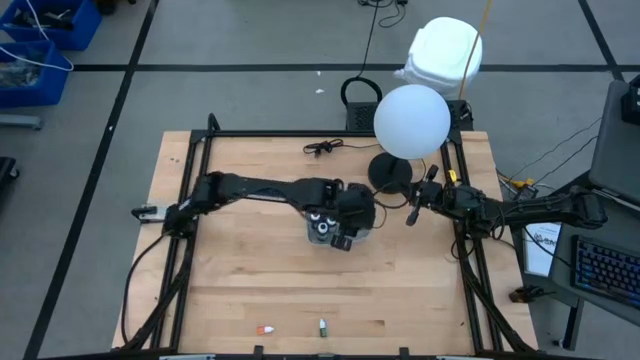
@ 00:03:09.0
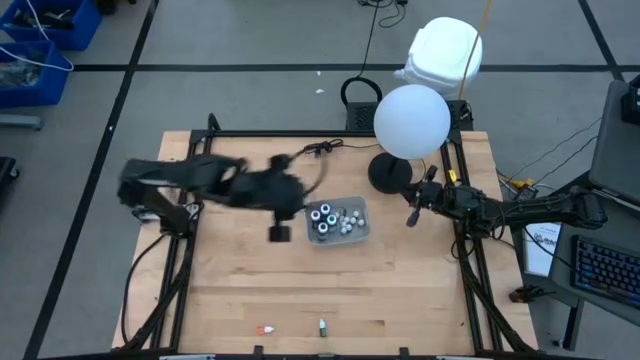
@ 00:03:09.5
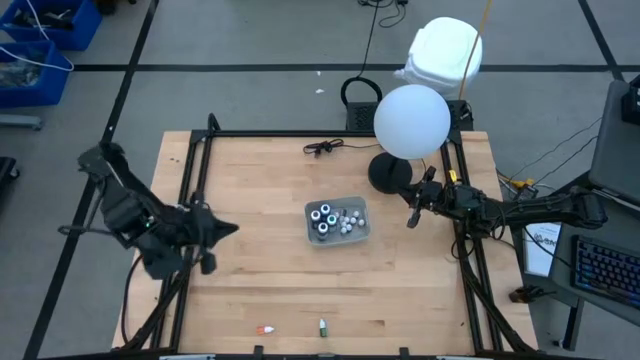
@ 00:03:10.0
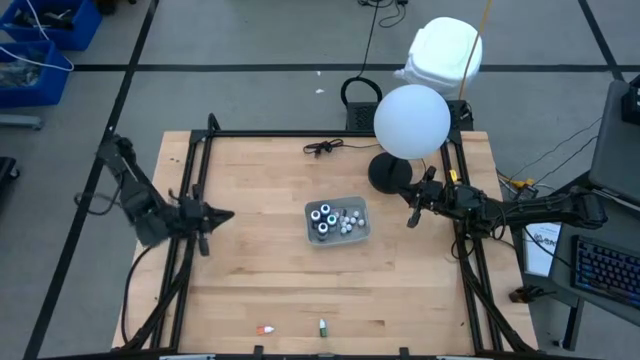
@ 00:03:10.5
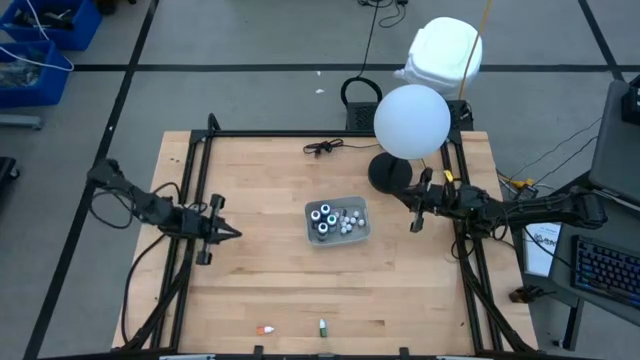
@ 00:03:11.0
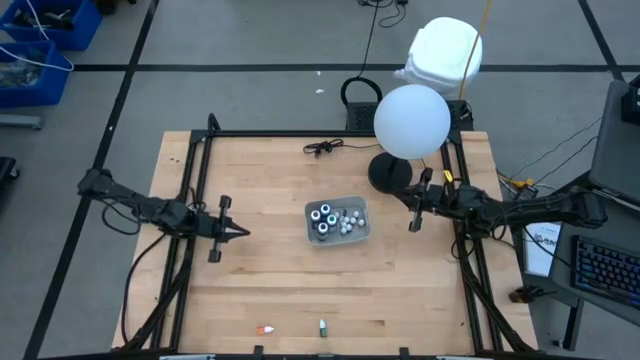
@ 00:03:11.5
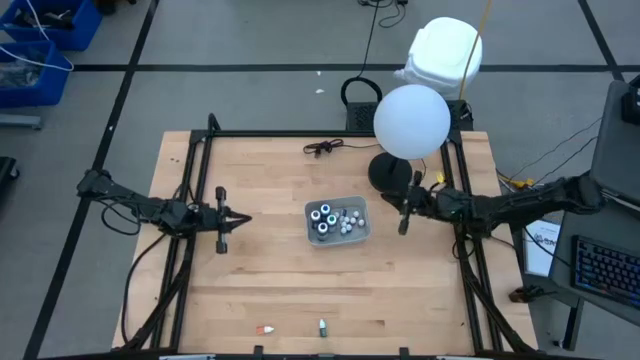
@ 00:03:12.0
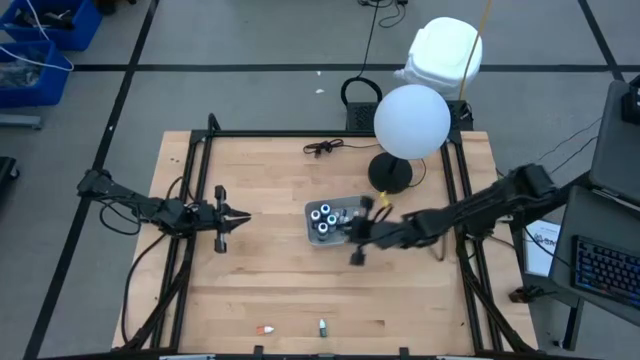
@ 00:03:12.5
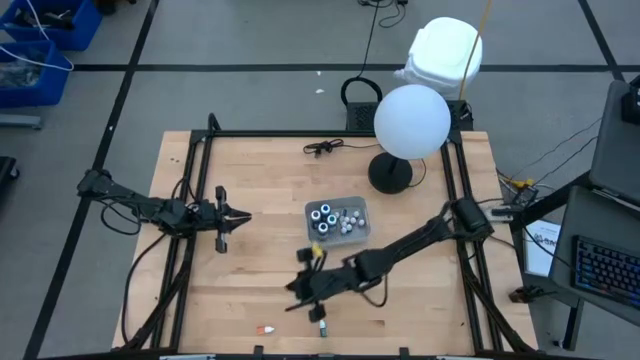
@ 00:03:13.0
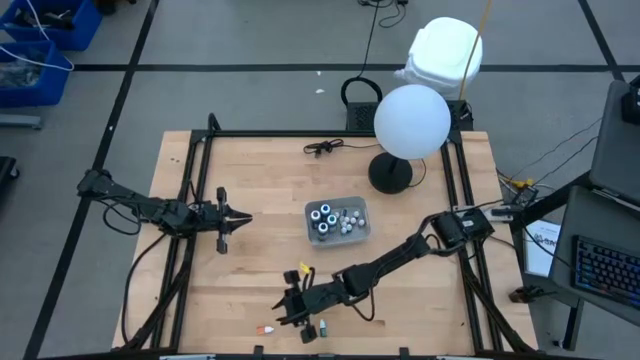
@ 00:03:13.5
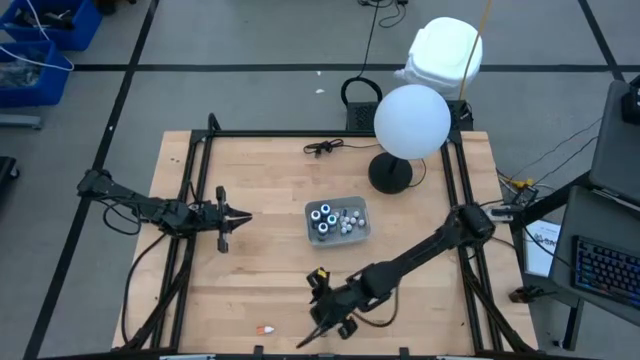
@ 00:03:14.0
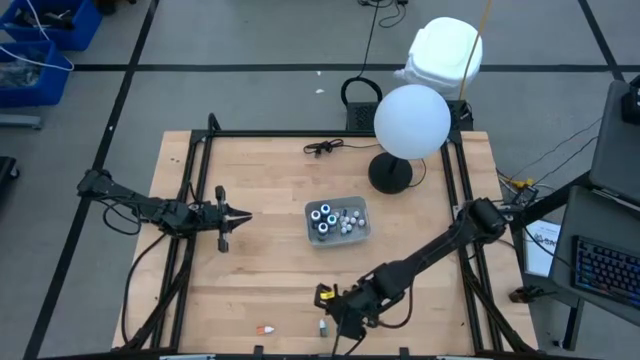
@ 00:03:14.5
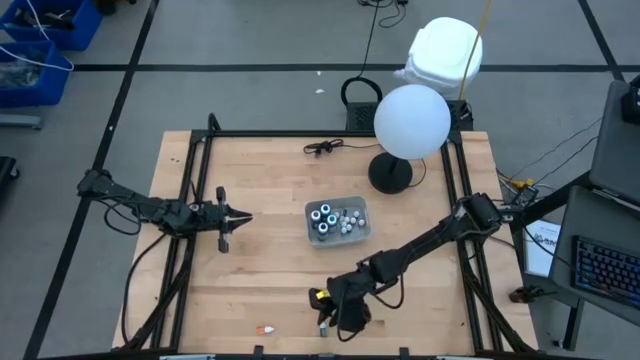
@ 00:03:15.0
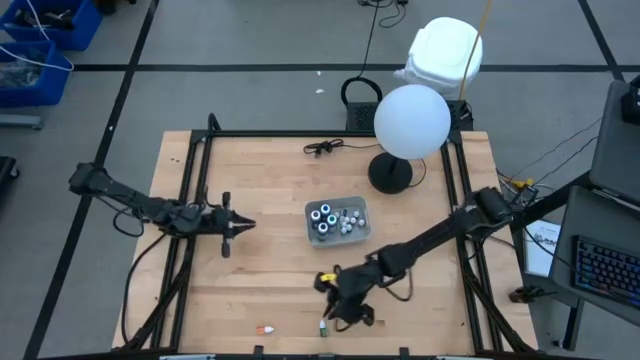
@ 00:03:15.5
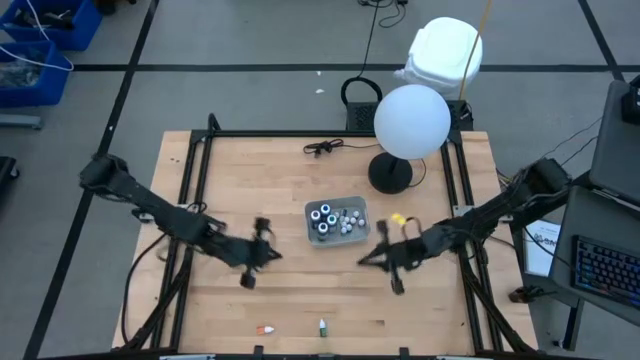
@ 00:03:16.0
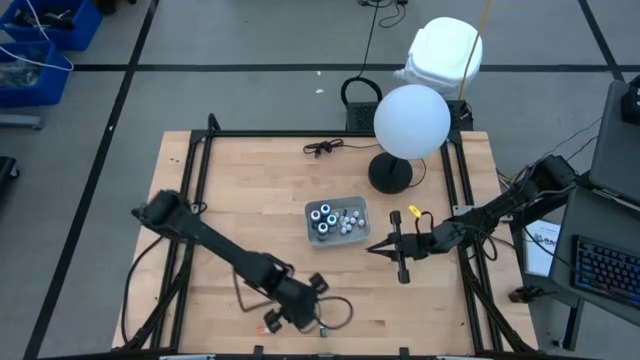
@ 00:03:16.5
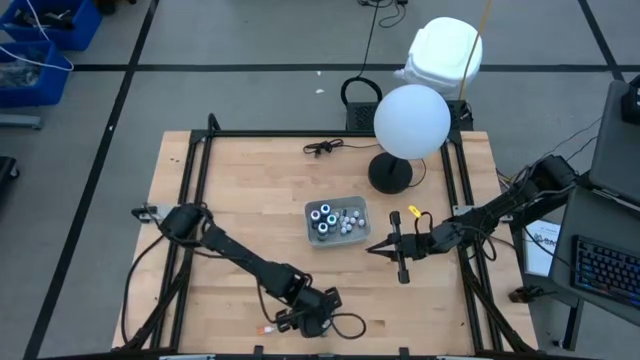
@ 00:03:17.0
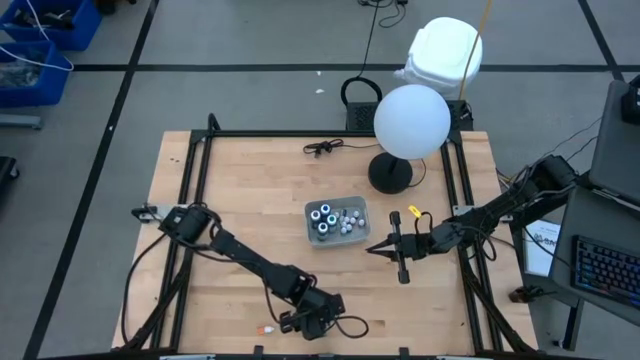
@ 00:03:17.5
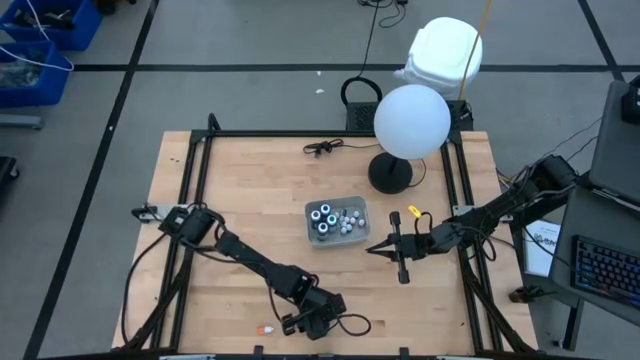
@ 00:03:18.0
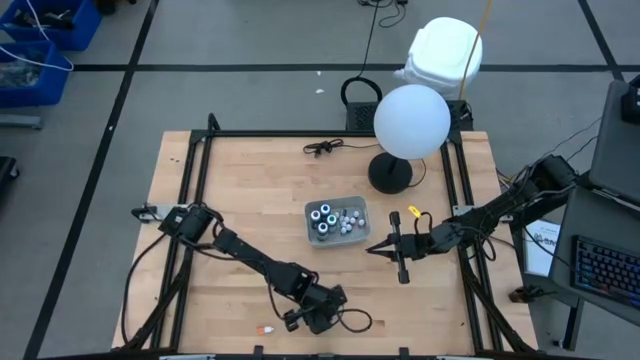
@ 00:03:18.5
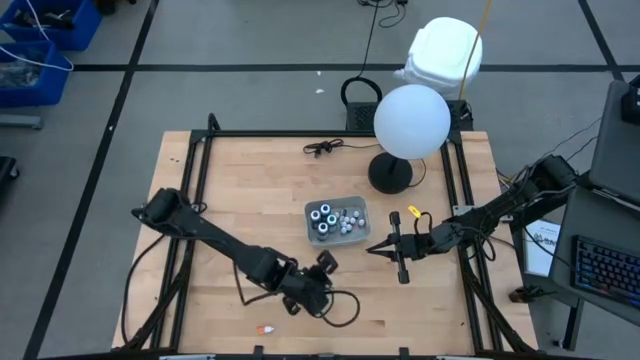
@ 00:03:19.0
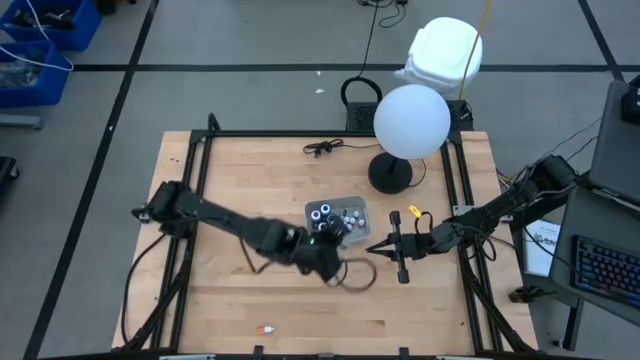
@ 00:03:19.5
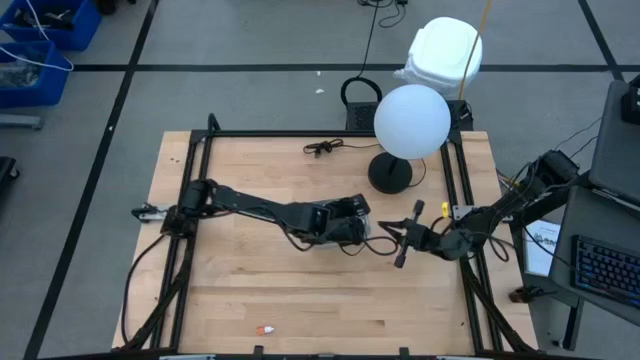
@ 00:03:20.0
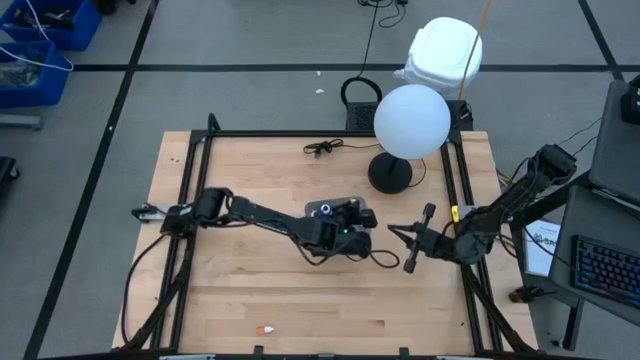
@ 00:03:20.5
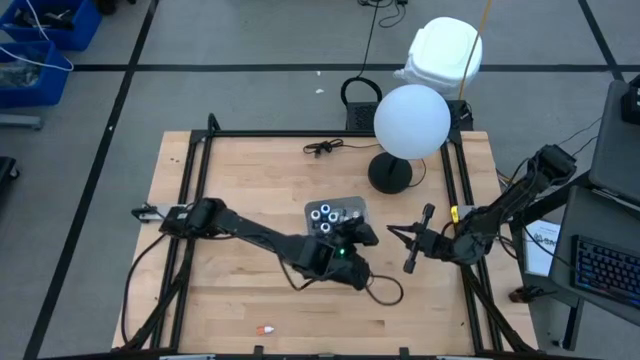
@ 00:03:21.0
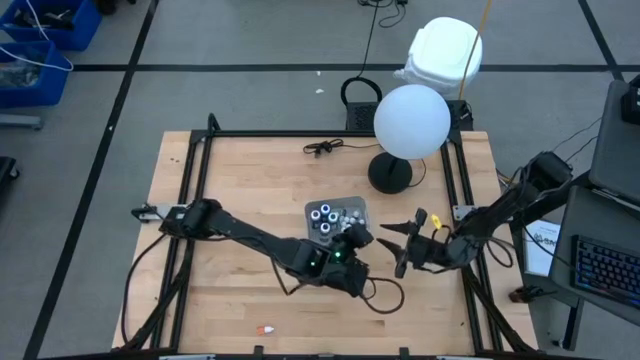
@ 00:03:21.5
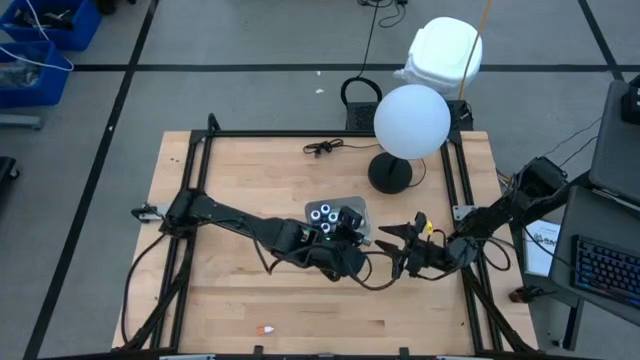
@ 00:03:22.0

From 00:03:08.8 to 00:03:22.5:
Task: Pick & Place food coloring
Put the small green food coloring bottle into the gray bin

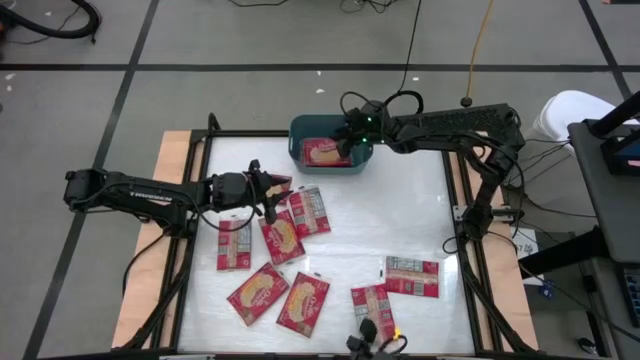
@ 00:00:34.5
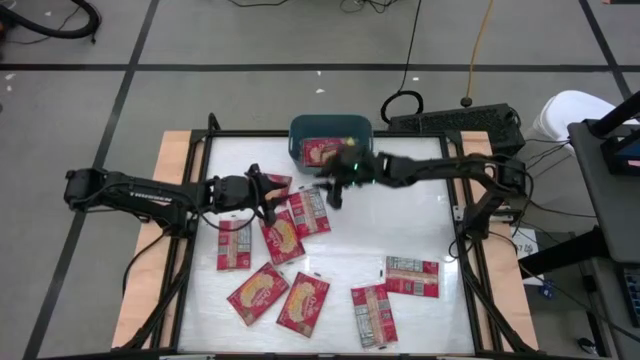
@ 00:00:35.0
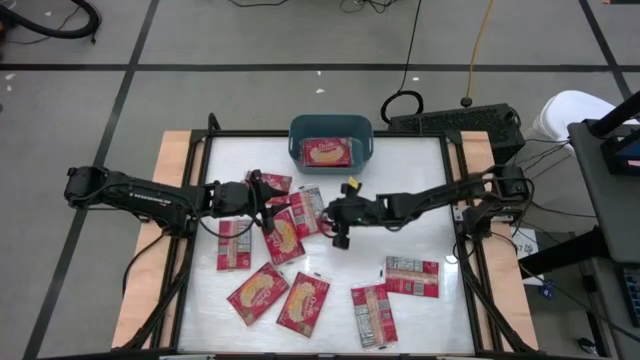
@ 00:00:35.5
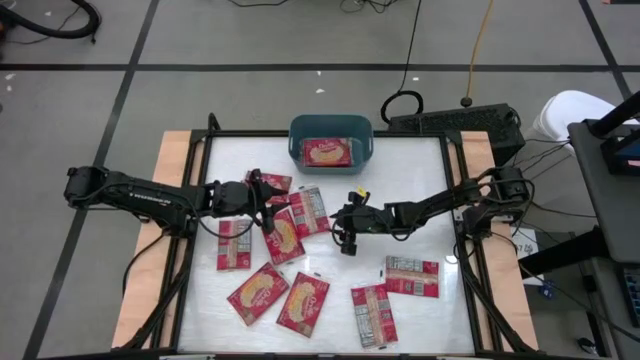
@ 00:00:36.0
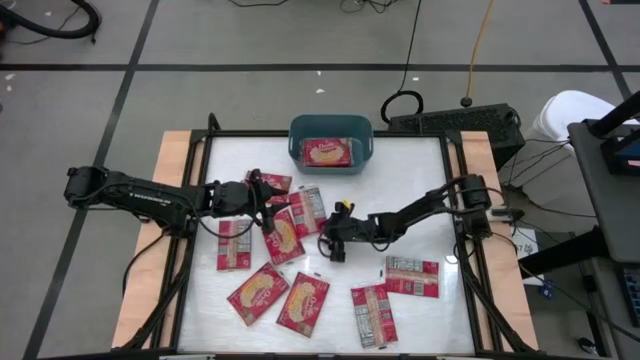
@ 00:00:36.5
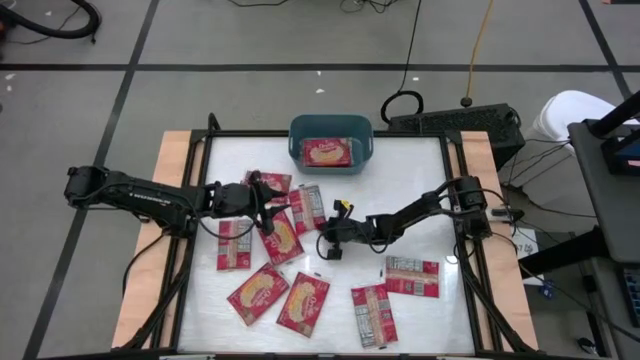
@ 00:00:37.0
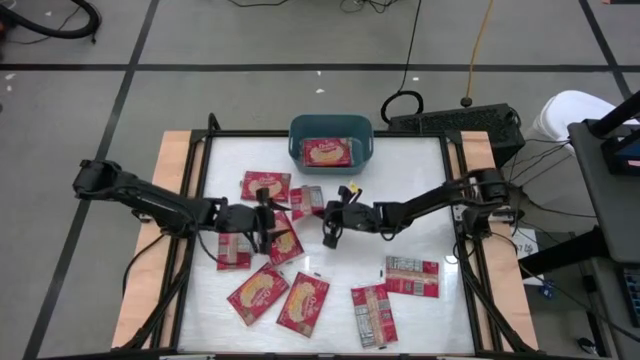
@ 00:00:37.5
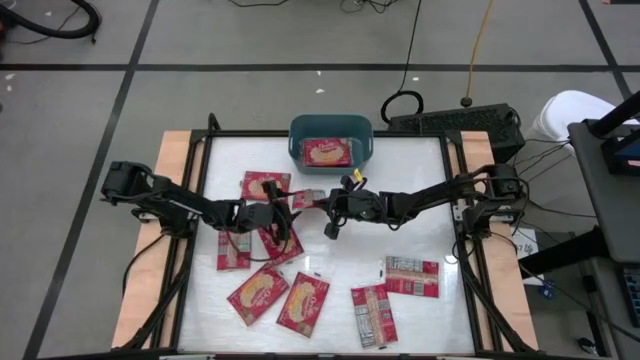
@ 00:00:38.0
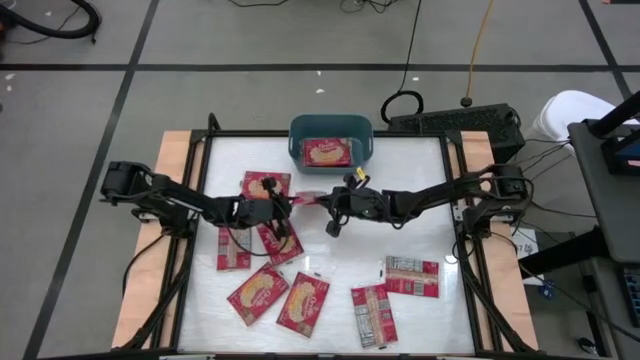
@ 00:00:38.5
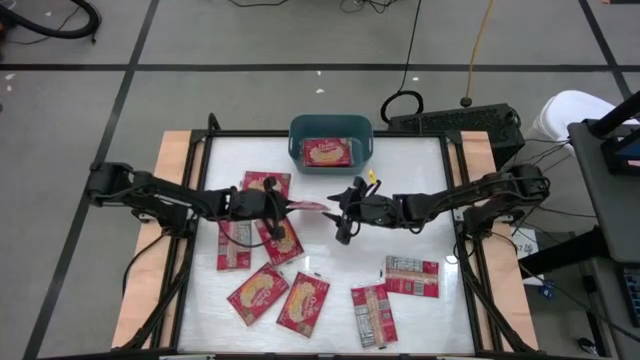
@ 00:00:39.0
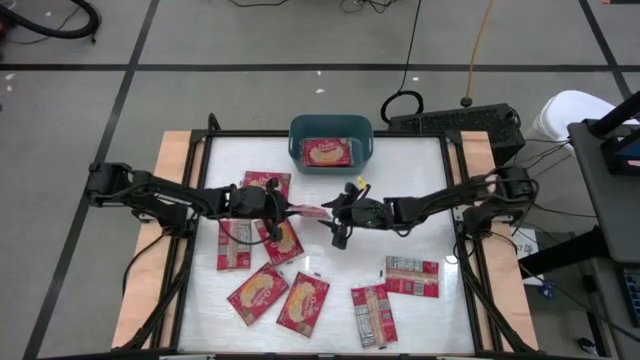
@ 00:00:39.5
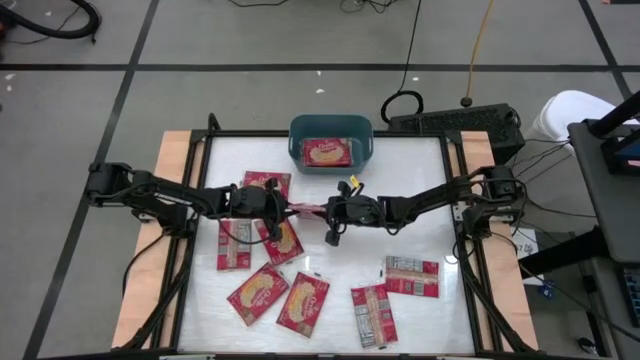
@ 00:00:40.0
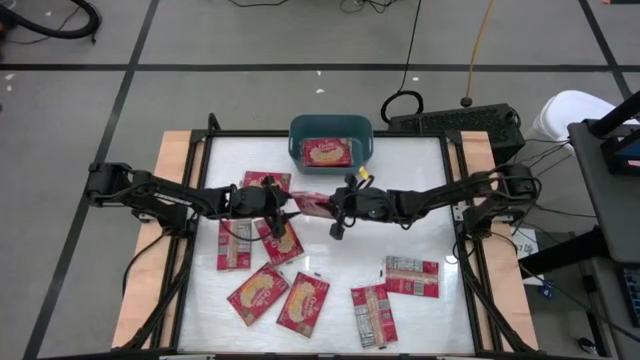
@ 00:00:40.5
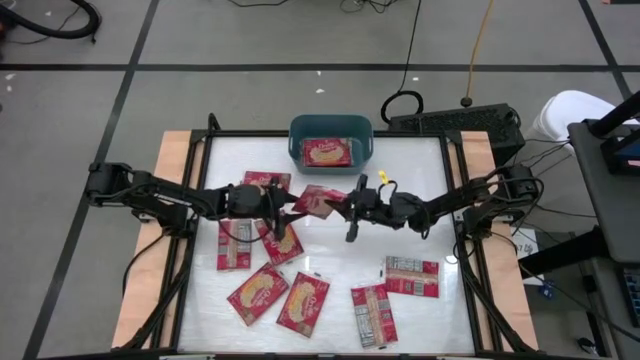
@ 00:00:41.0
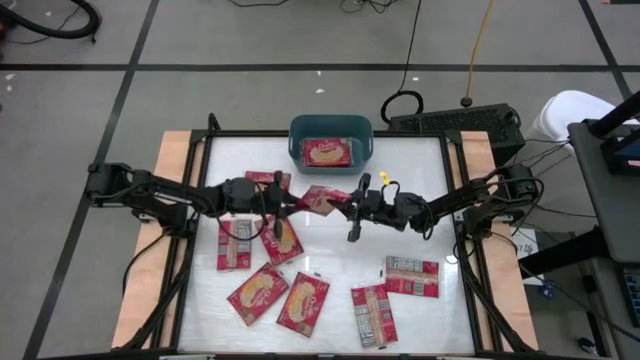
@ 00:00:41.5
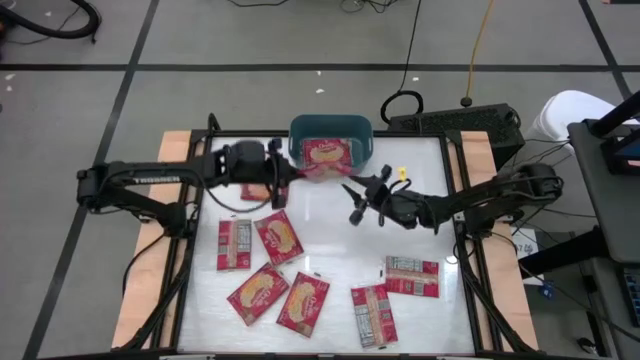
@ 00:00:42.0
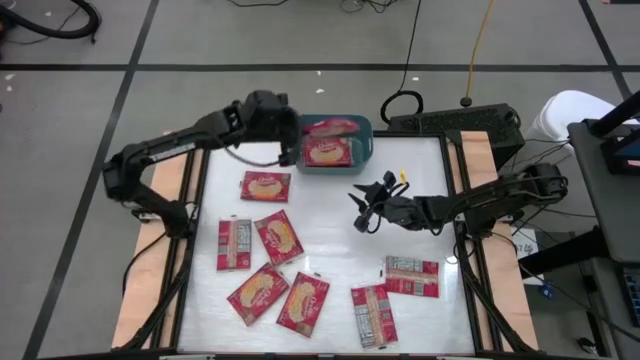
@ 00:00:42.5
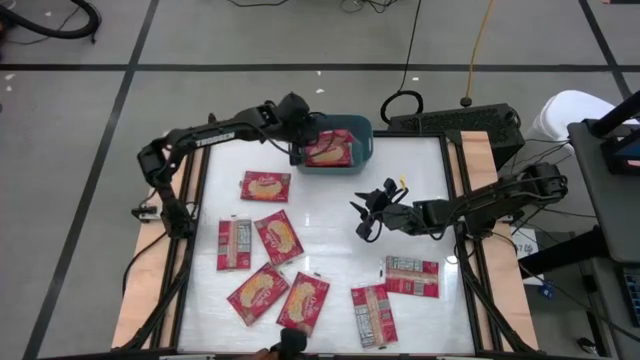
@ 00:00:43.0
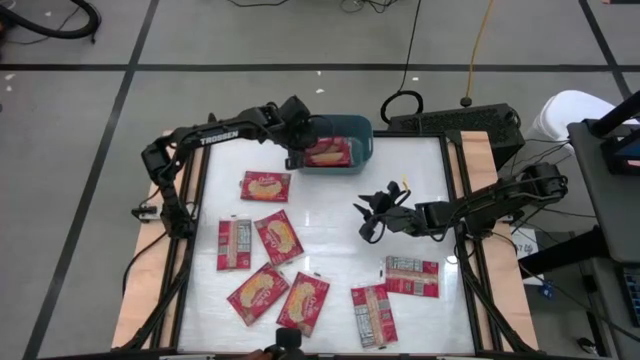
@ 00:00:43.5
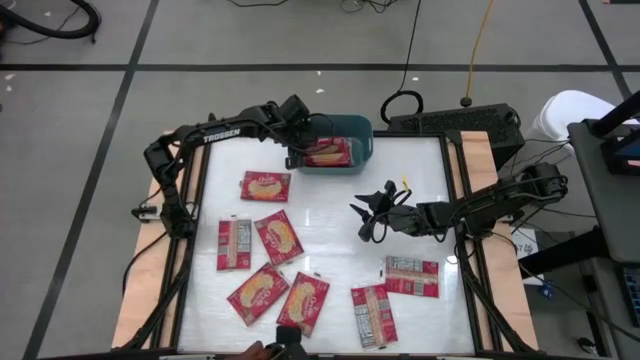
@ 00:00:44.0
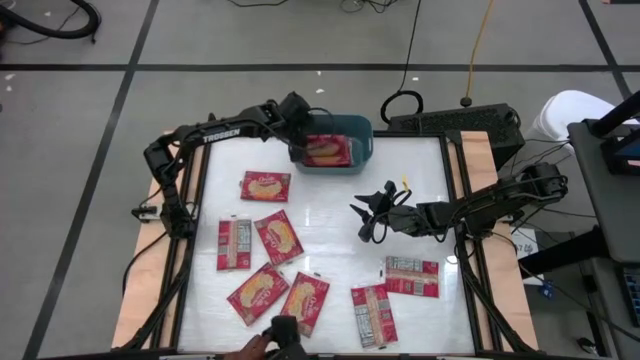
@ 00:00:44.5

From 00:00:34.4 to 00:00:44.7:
Task: Sort popcorn bags into baskets
Put the red popcorn bag into the green bin
